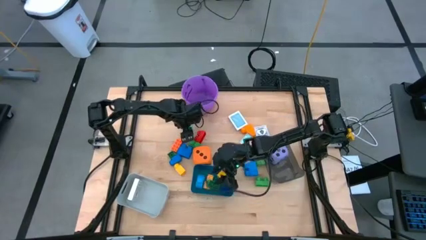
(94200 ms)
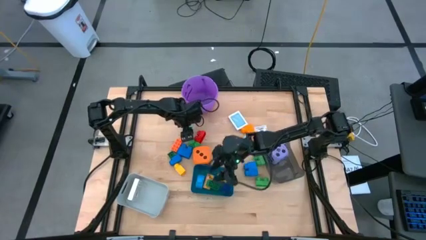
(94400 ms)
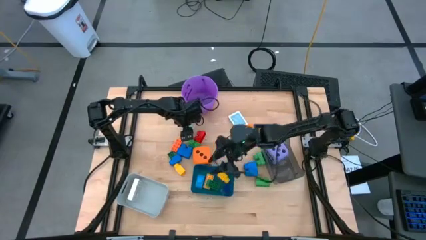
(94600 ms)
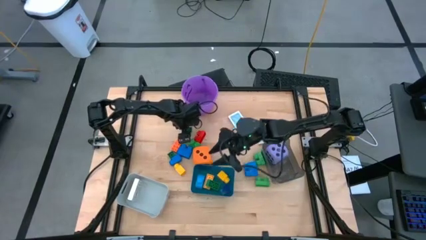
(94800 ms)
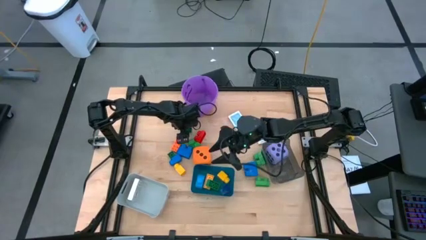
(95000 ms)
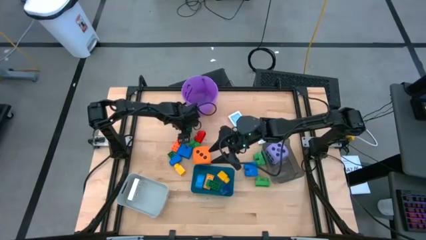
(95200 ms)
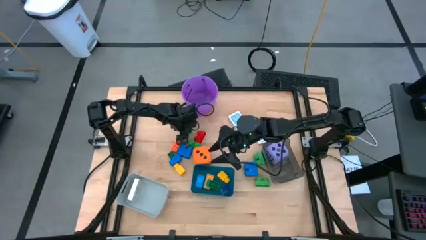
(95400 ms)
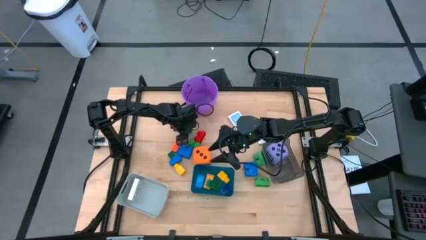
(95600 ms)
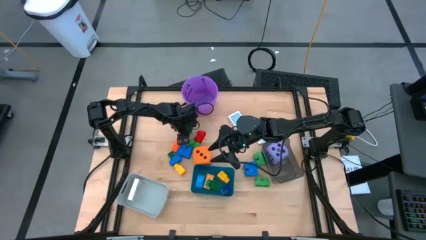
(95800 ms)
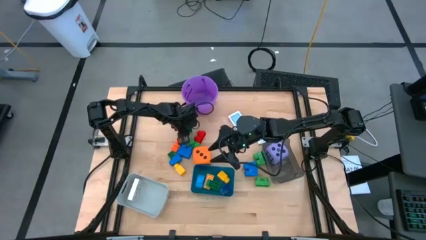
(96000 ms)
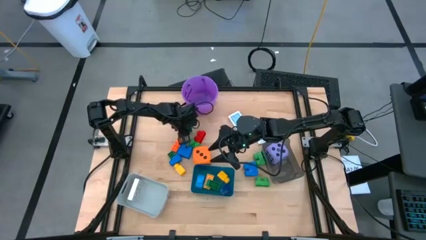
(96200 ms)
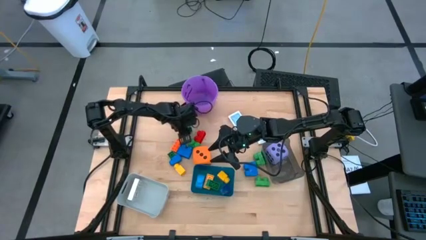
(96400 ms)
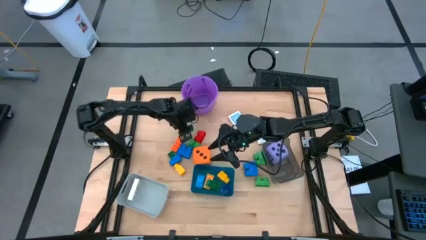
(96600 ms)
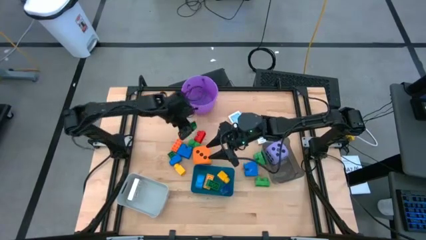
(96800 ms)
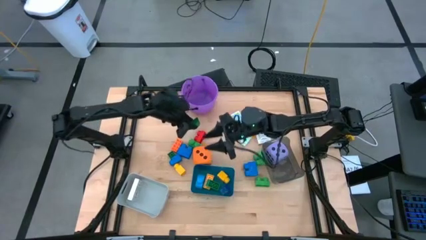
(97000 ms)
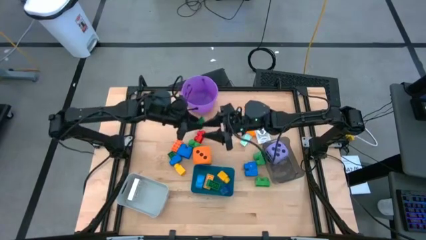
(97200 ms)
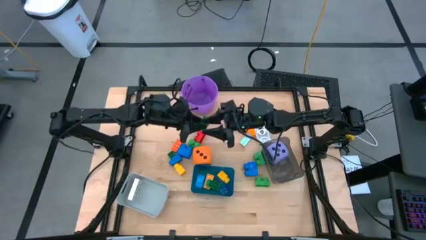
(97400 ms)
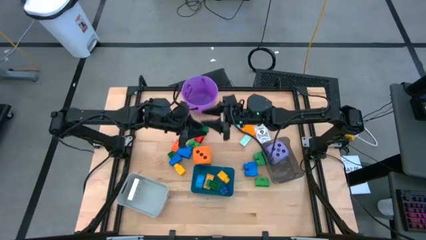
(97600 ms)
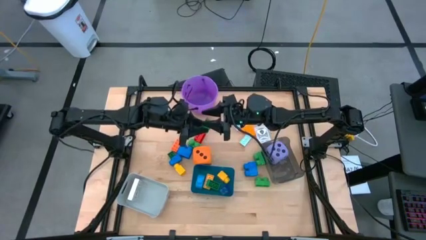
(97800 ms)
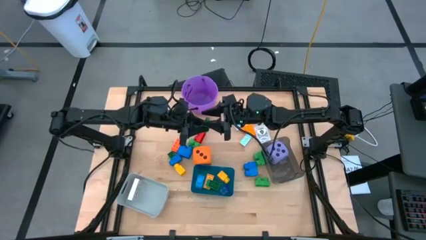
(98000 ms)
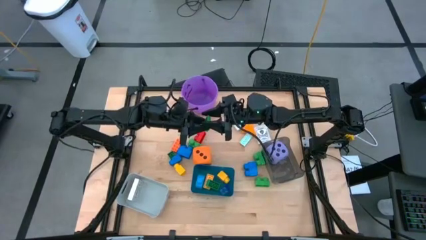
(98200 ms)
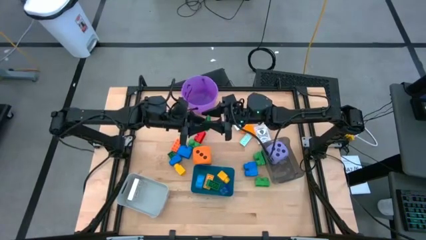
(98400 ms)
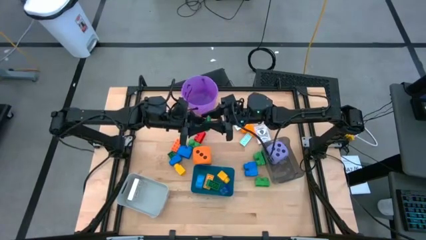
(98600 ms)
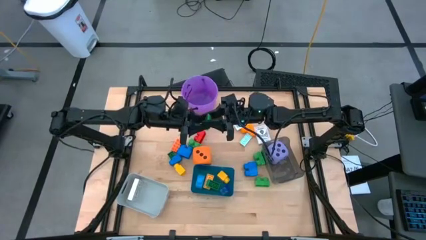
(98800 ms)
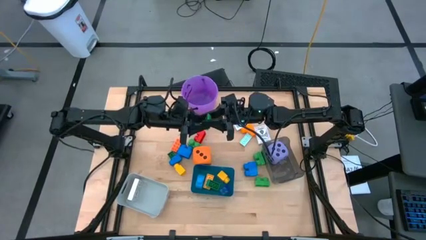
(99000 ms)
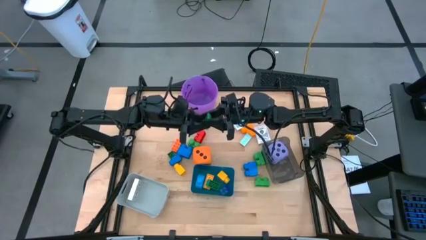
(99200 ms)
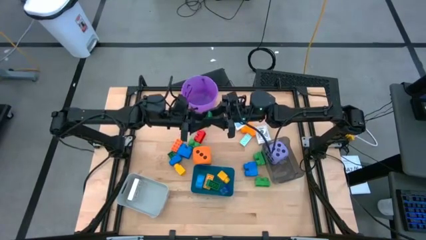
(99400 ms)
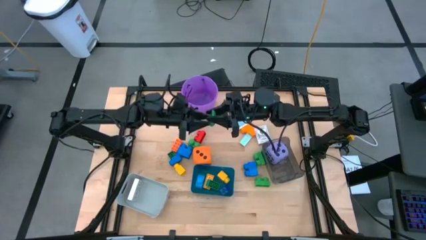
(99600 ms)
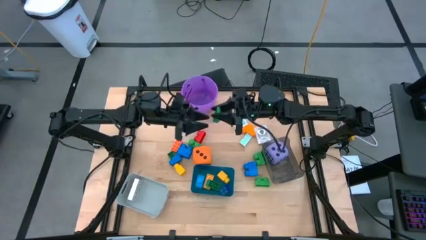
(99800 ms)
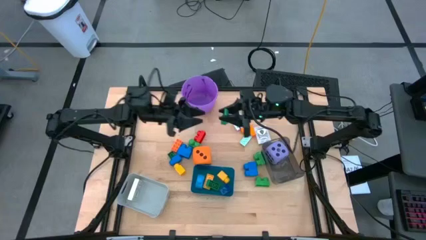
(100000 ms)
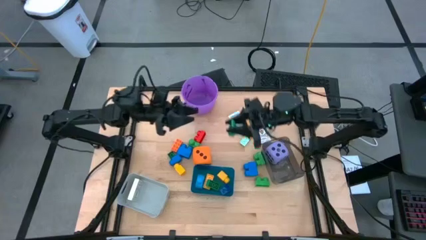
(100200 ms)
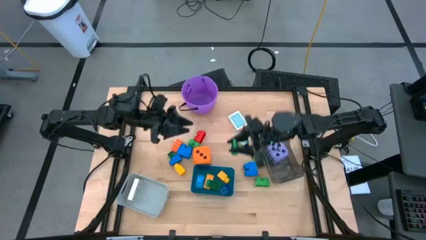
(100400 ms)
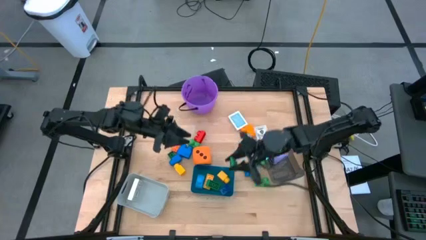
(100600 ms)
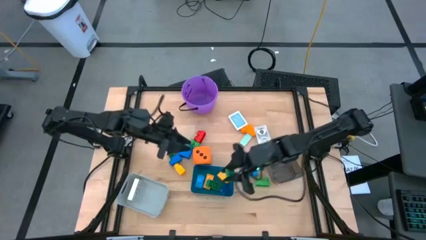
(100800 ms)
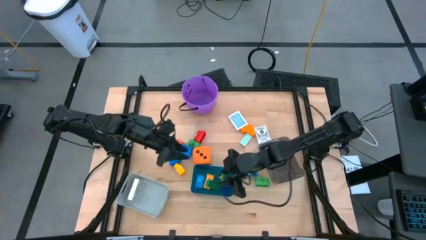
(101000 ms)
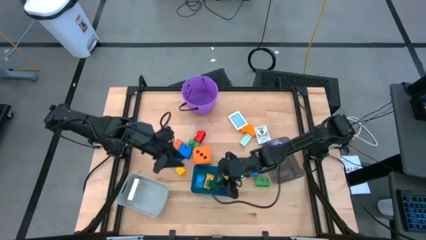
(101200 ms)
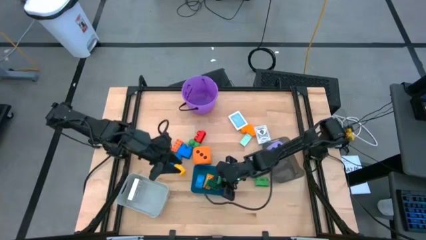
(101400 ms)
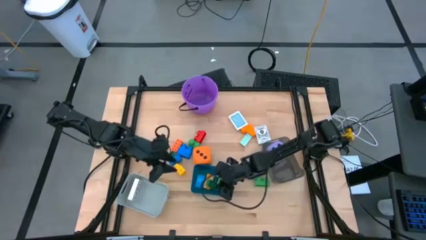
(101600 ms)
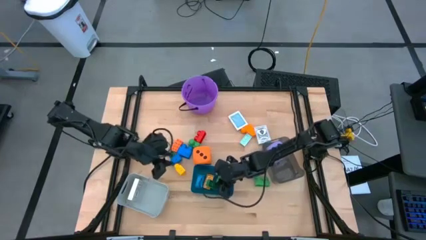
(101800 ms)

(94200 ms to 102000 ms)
Task: Pick & Place Toys
Put the green game piece into the blue bin

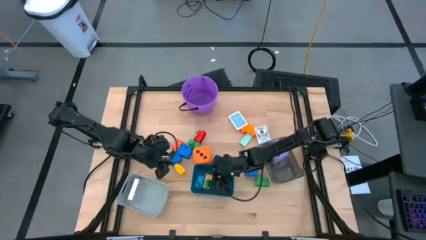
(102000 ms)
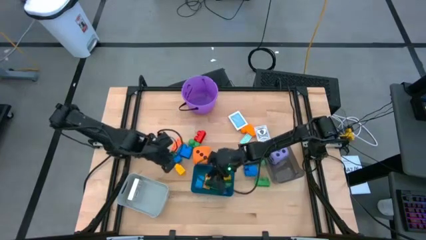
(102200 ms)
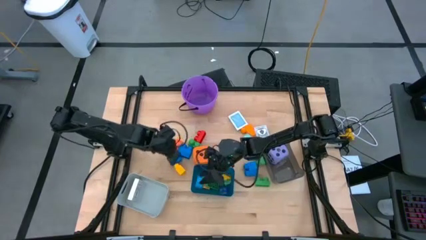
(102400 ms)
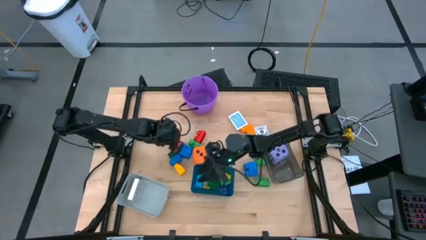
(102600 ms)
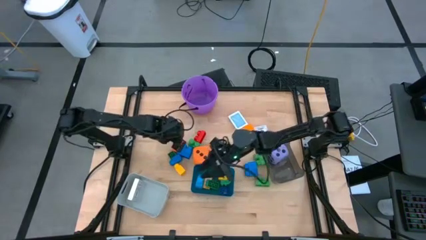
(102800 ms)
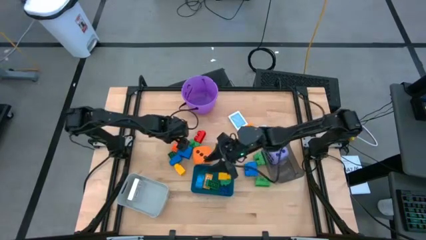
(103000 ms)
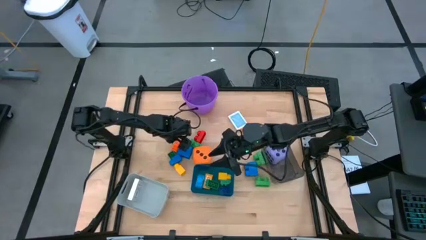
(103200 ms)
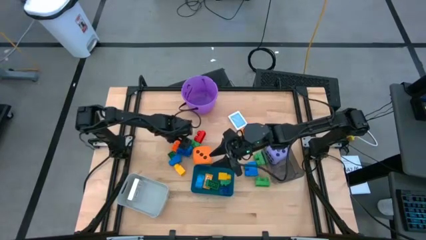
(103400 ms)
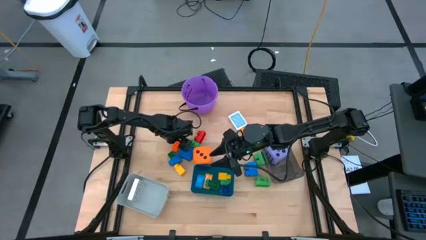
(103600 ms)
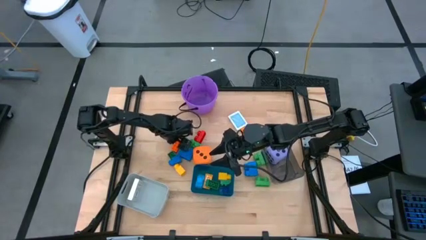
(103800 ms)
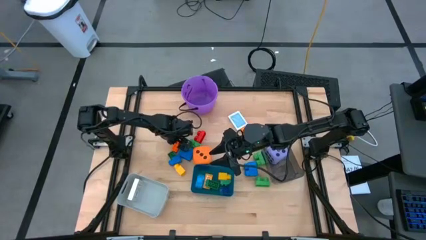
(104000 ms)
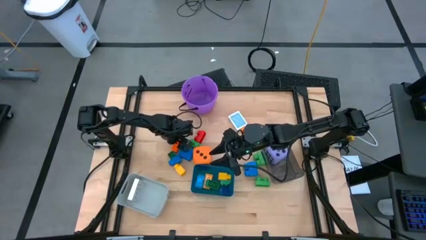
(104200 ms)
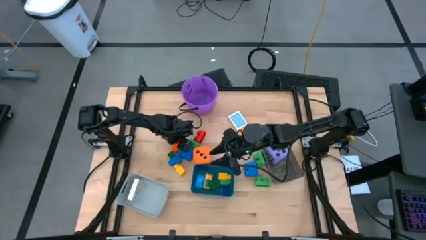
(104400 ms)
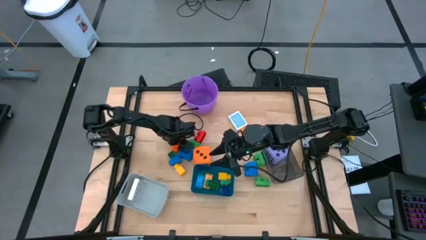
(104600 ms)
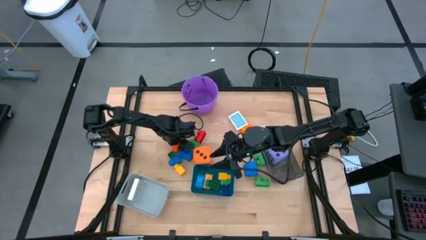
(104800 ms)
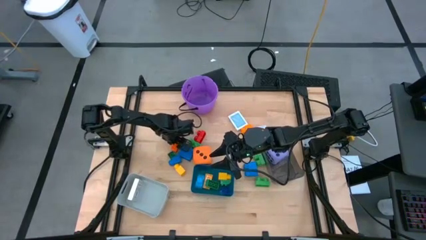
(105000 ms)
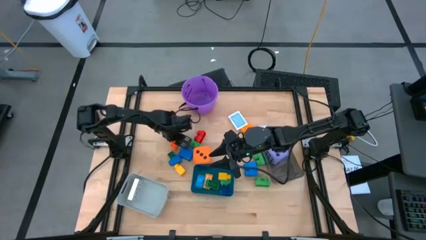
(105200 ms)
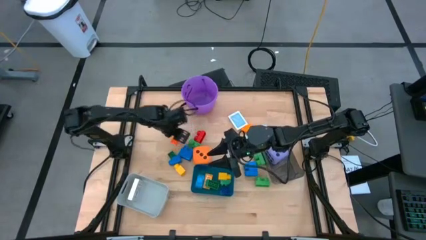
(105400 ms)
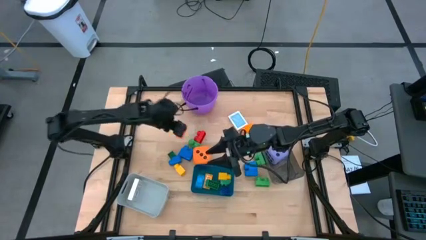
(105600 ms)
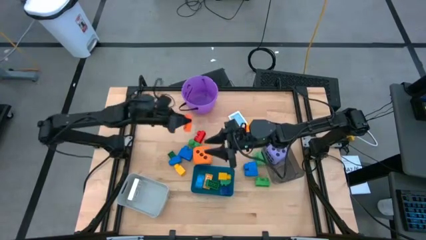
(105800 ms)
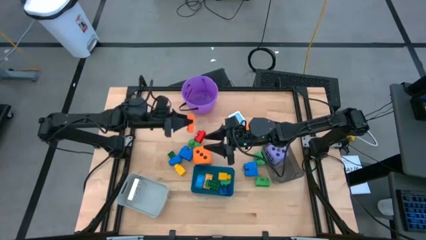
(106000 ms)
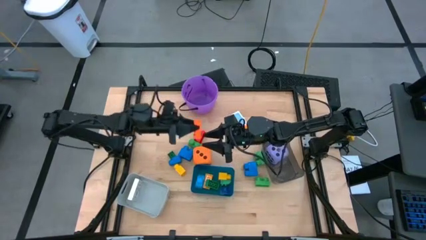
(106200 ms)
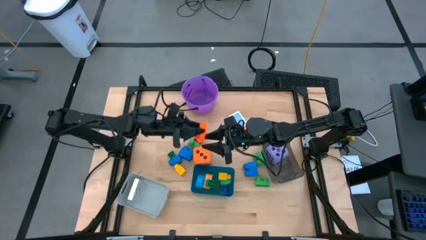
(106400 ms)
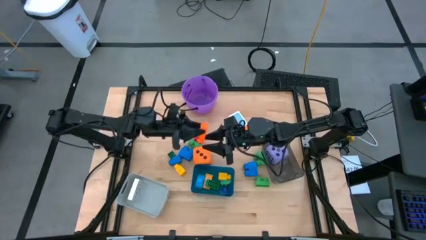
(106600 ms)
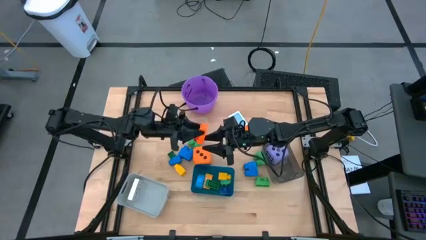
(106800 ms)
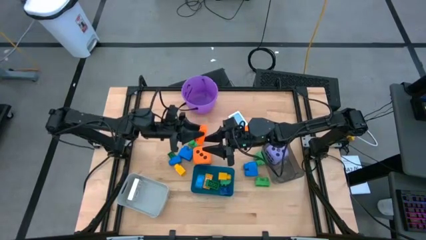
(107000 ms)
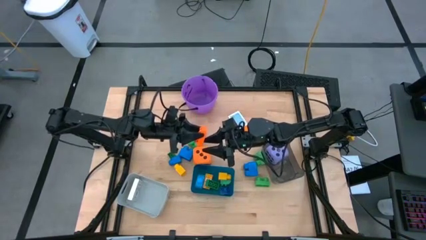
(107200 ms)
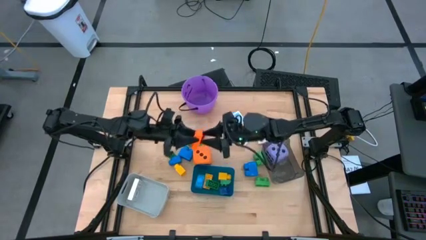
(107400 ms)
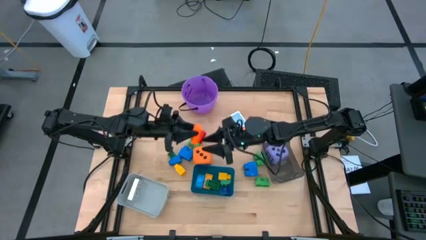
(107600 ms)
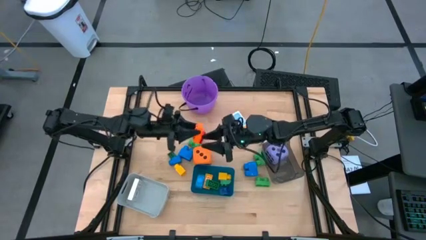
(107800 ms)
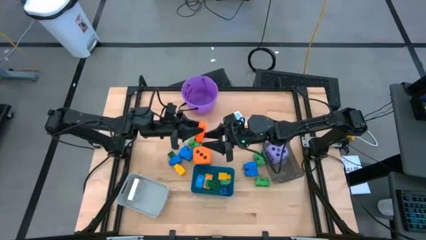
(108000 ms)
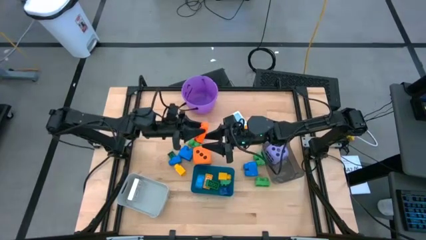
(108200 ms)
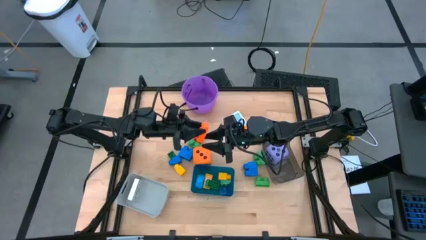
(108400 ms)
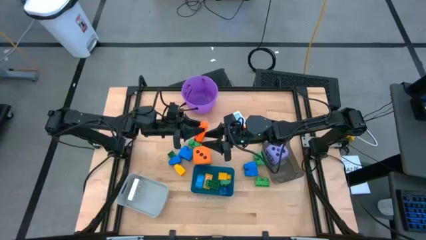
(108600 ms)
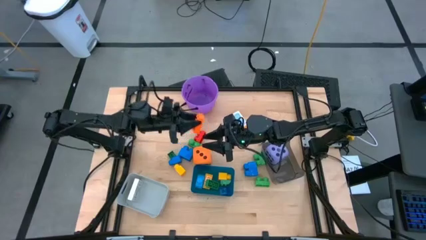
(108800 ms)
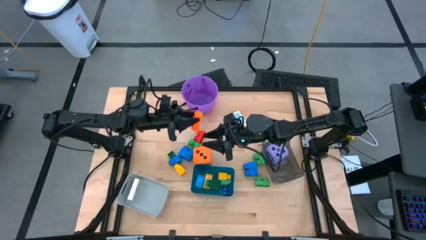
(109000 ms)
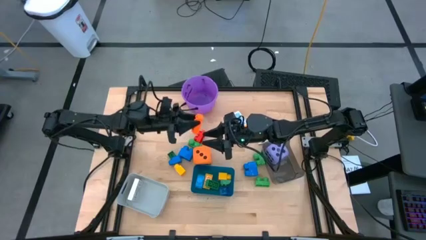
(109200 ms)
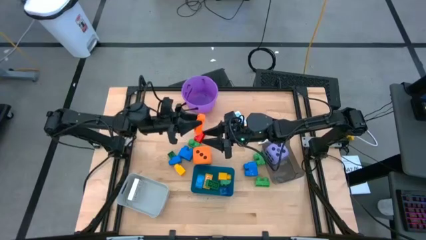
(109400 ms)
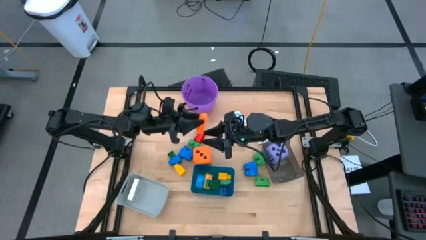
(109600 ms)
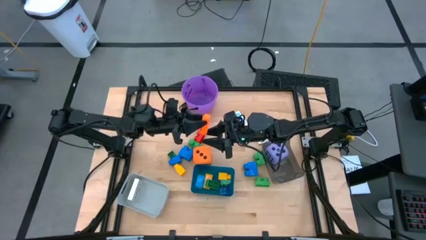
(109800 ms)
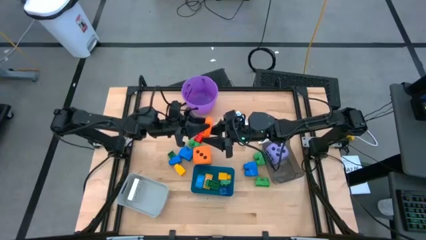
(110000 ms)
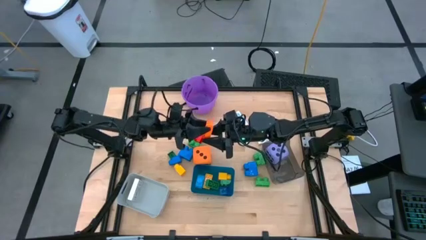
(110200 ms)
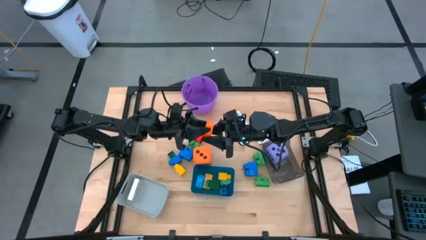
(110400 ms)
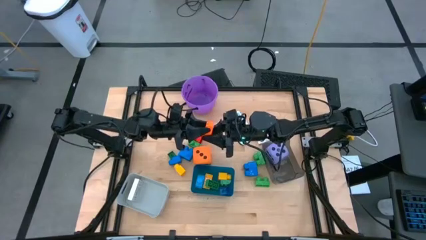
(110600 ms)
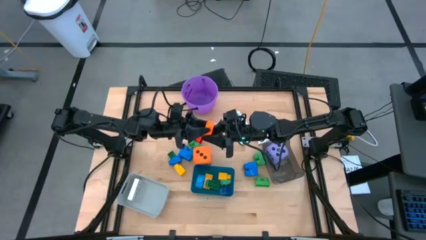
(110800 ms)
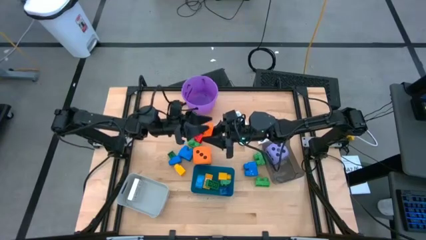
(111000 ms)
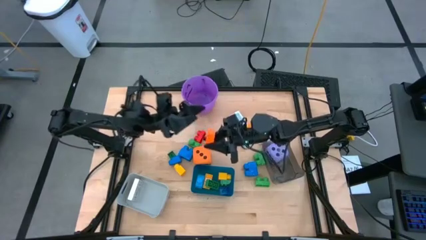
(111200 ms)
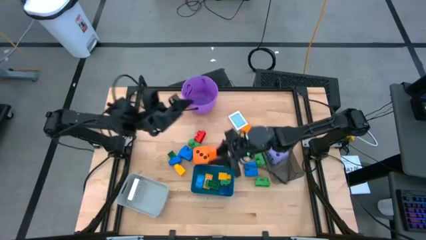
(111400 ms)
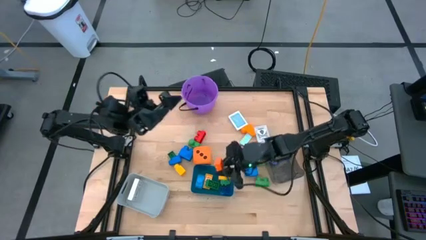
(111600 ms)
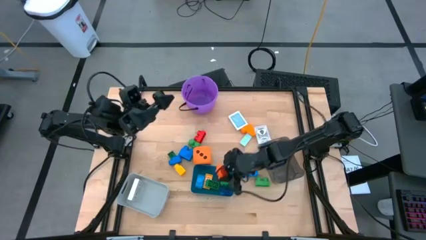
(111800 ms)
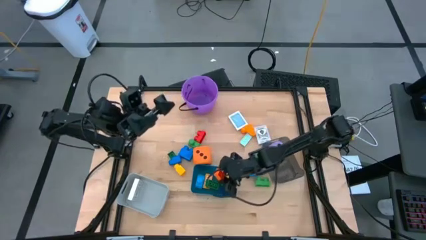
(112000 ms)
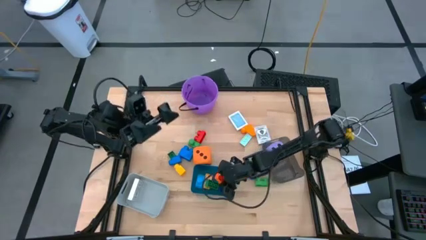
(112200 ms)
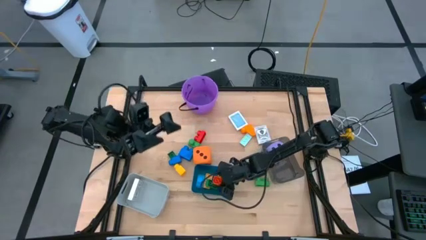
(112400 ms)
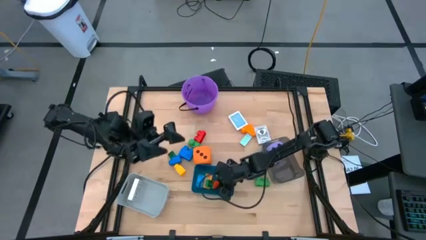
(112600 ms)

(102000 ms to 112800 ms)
Put the orange game piece into the blue bin
